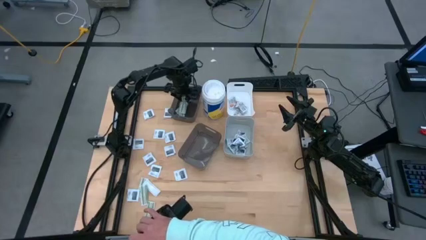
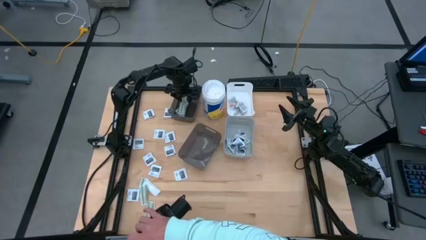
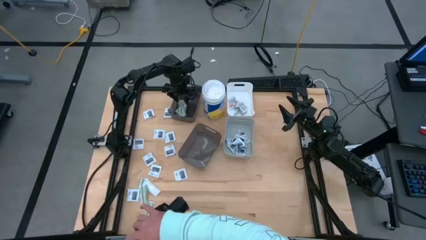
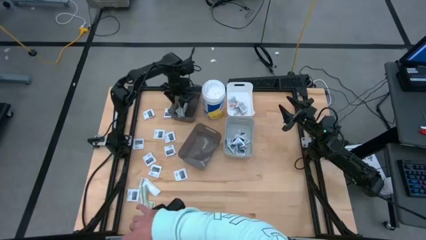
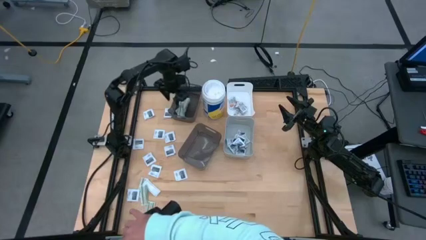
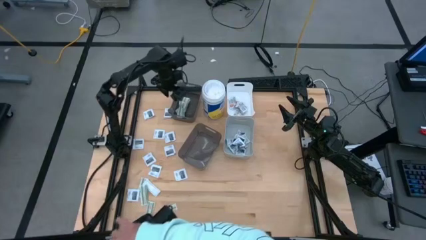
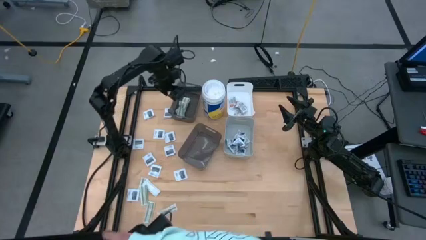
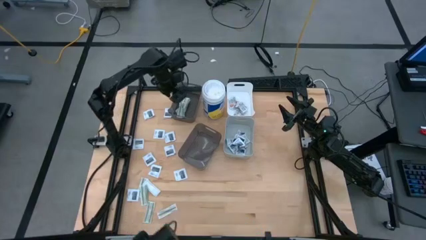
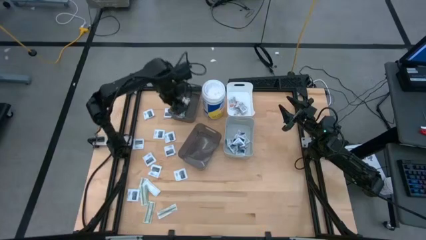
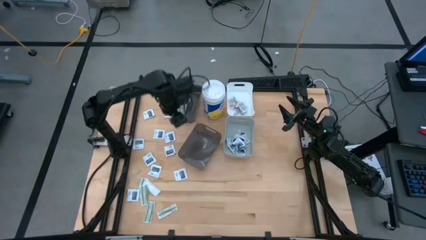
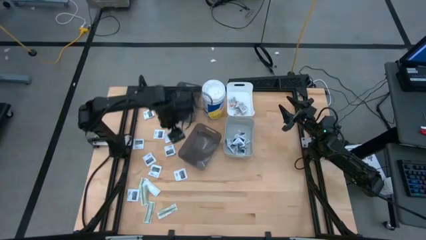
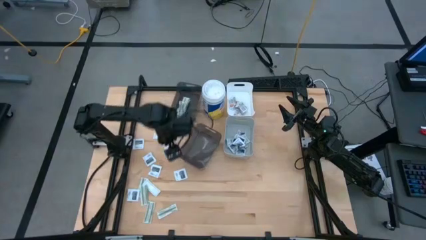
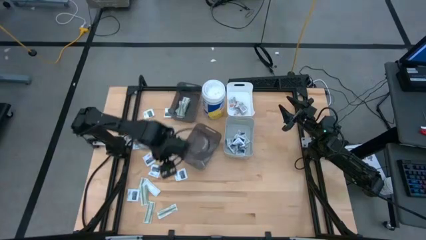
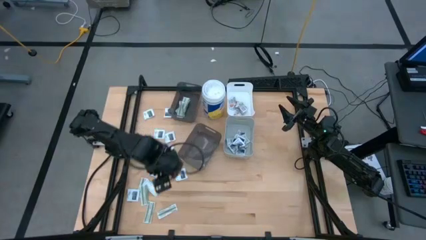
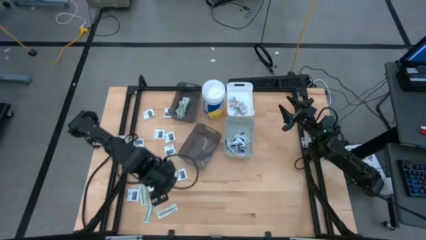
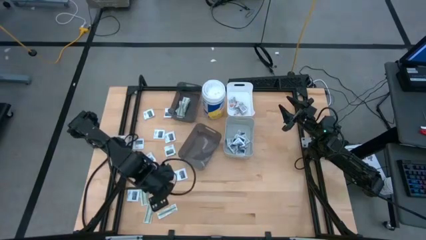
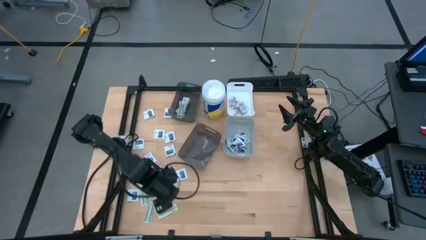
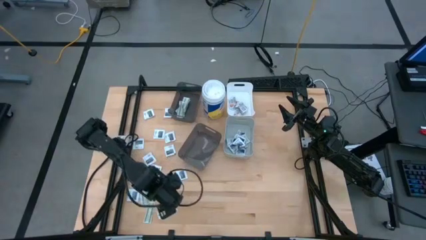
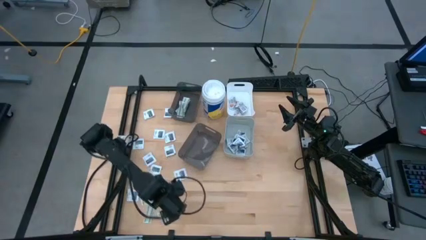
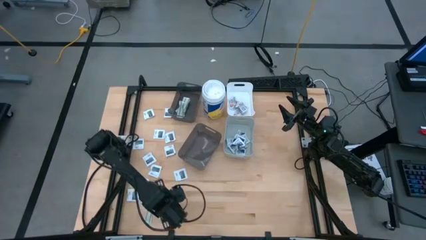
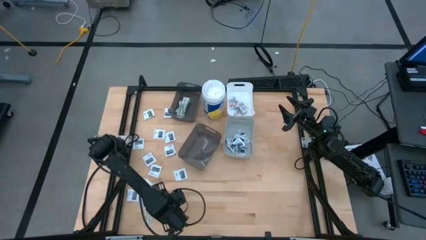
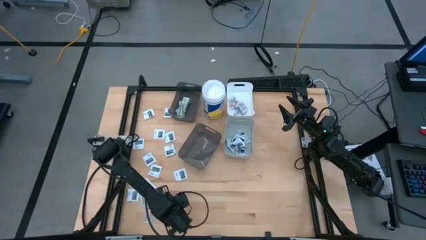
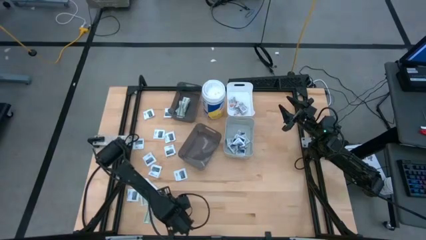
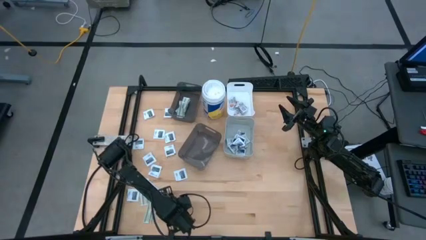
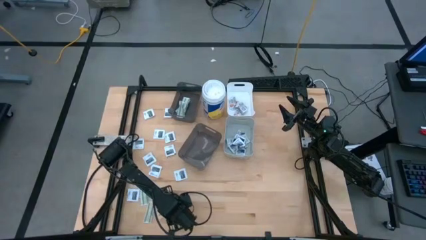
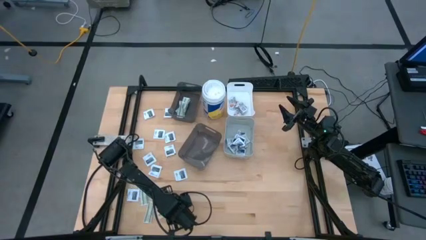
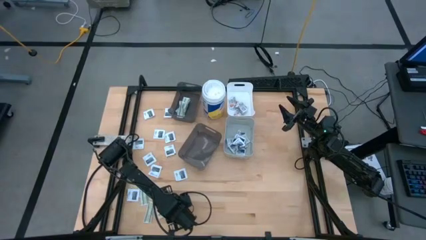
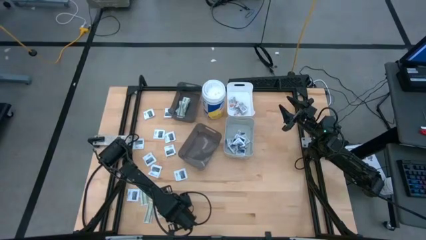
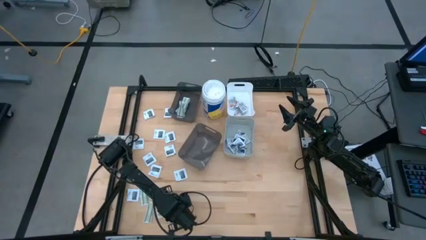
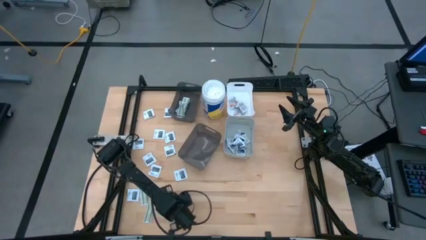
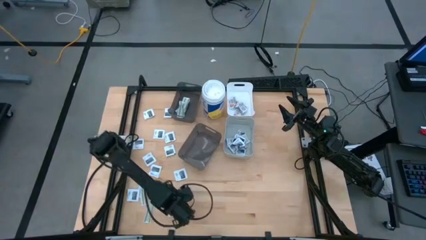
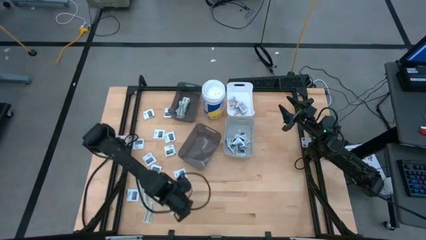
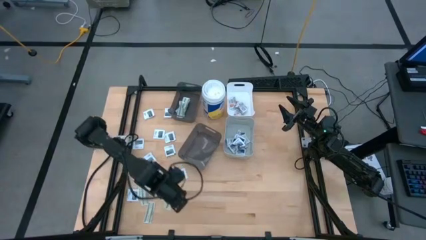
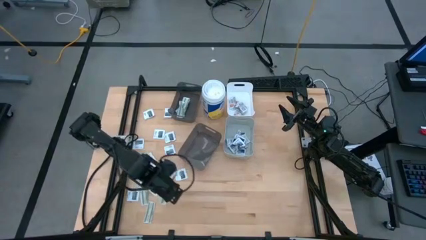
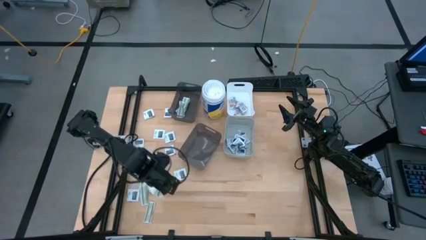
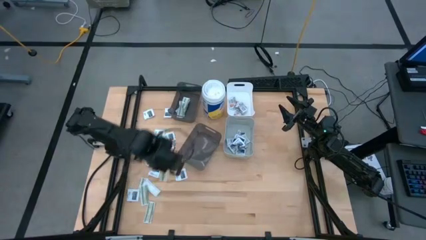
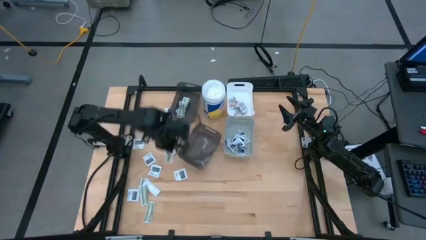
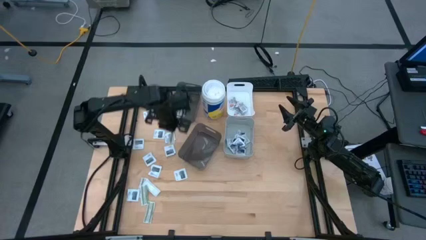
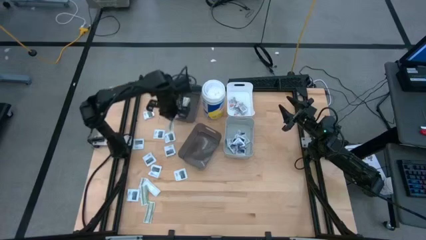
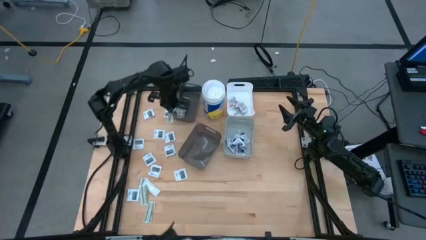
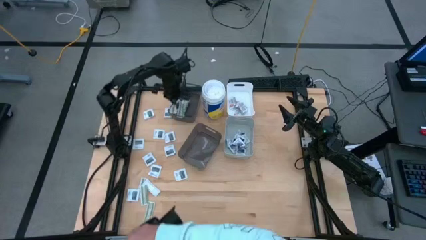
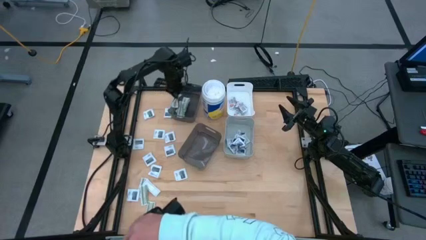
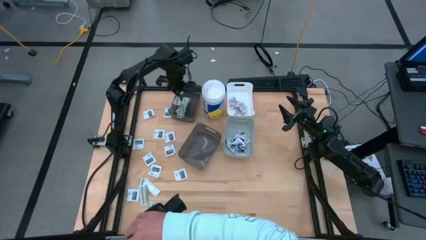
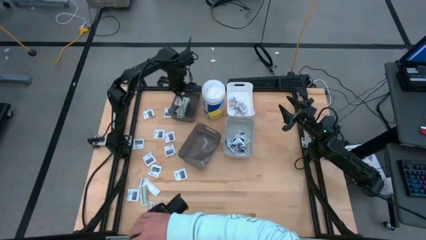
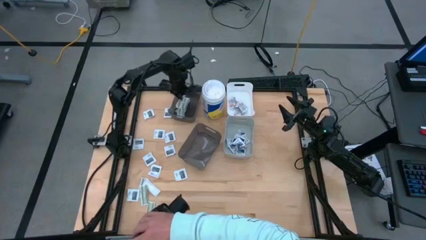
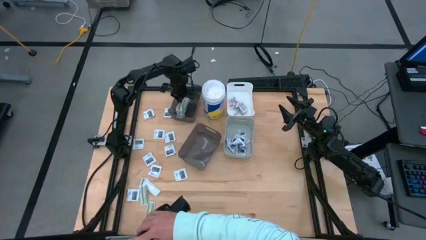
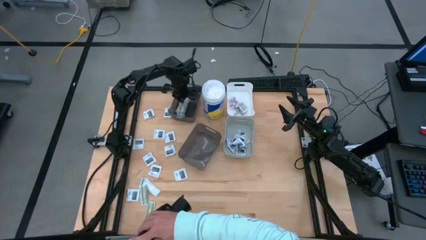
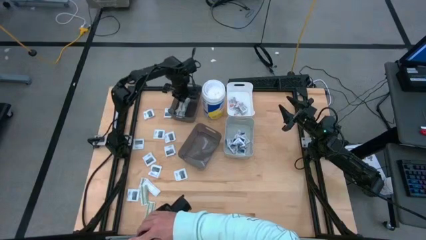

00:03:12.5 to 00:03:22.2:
Task: Pick & Place First Aid Supplies
Put the bandage pack into the top black bin

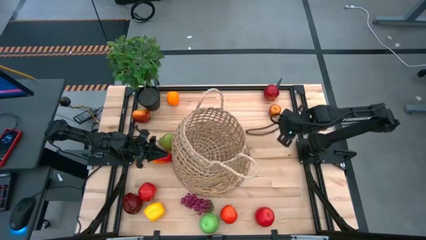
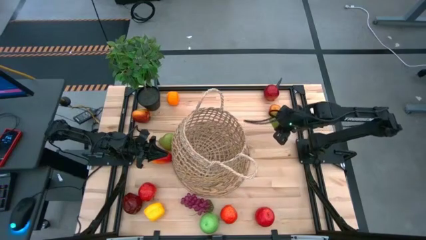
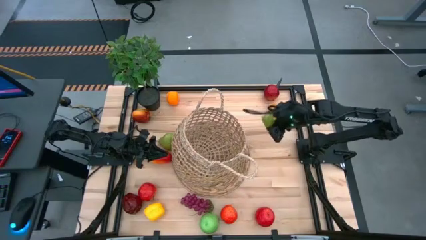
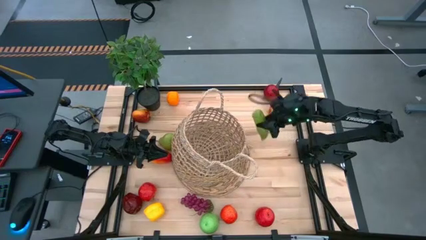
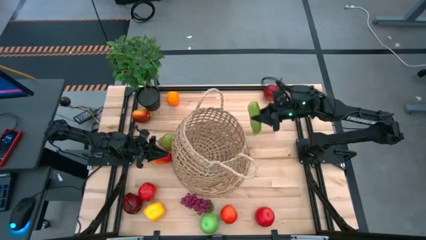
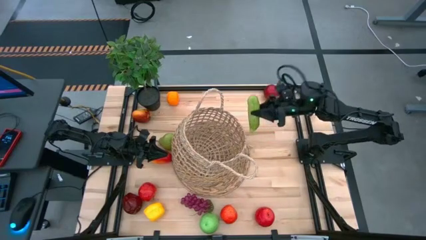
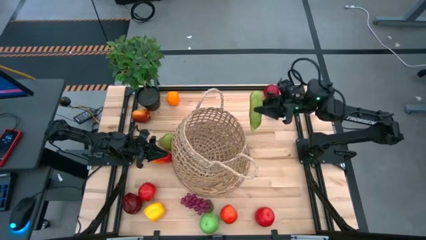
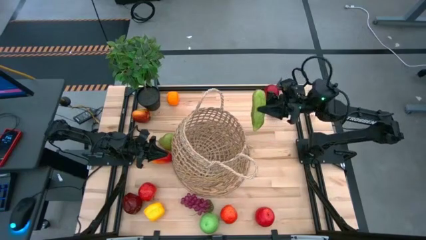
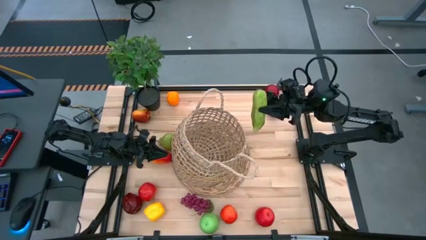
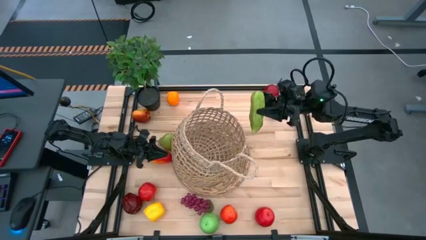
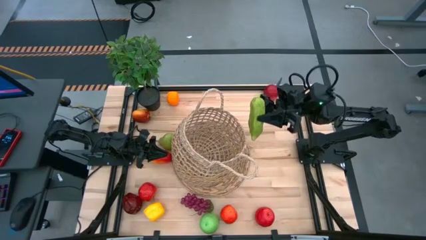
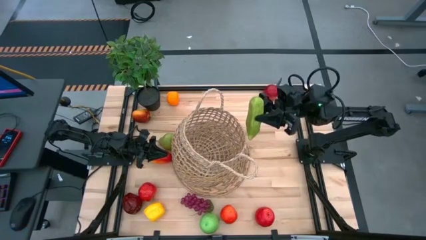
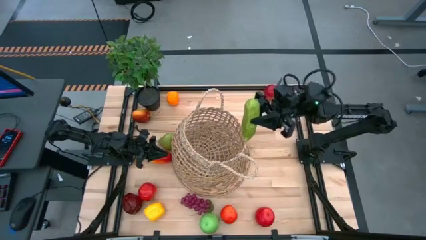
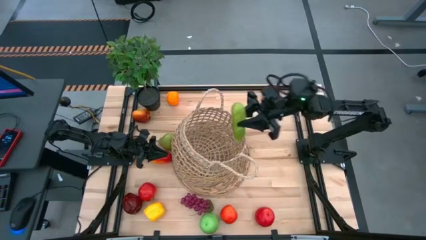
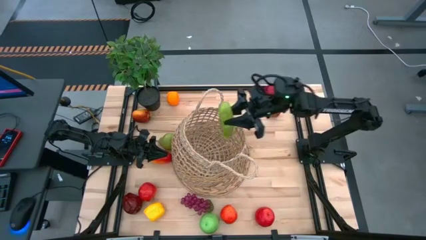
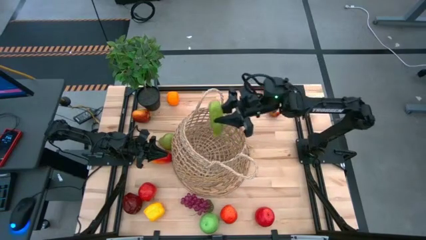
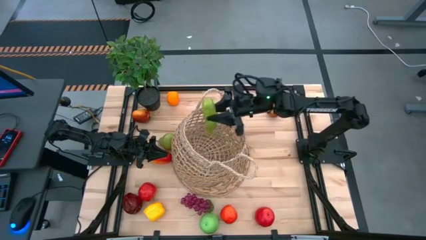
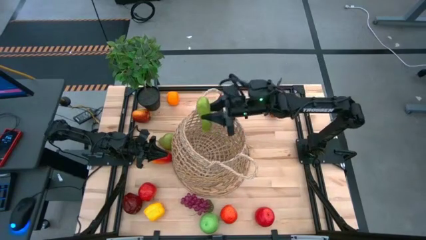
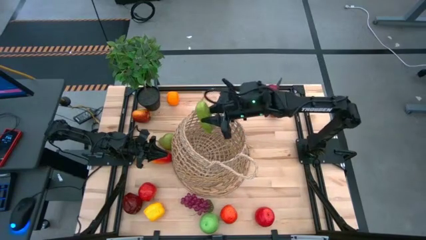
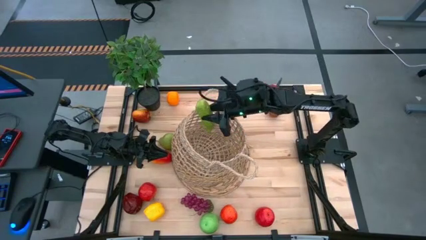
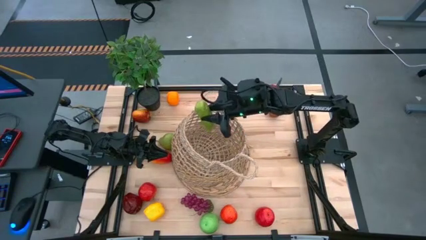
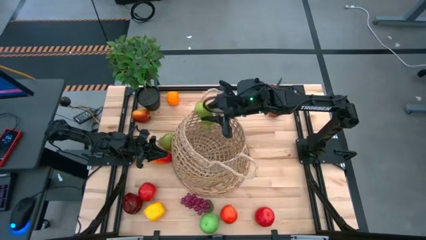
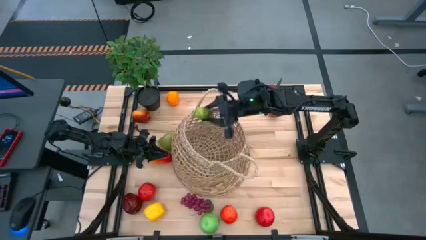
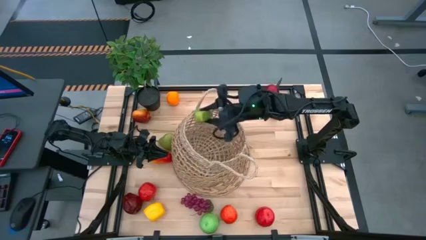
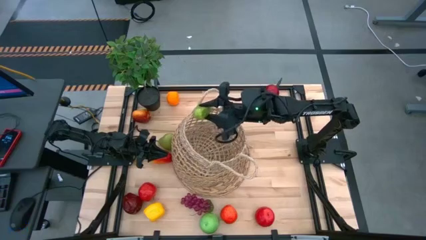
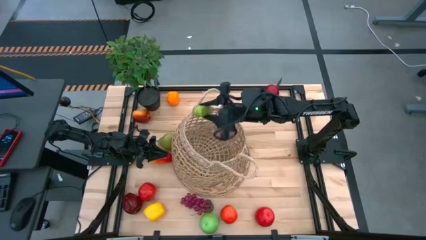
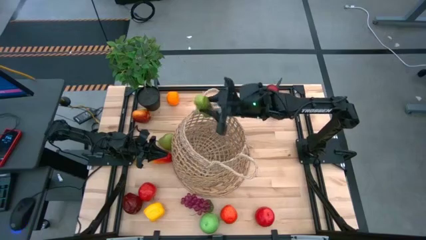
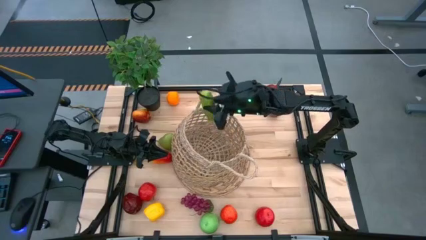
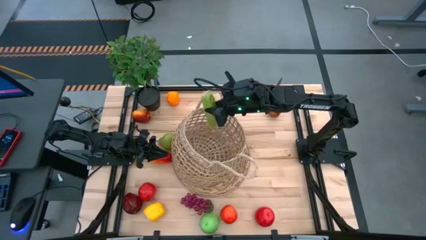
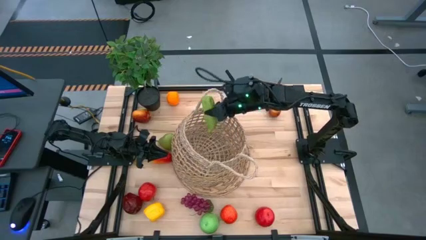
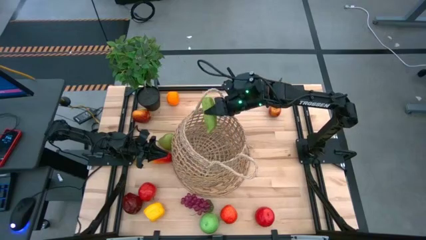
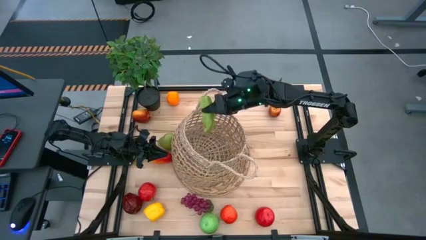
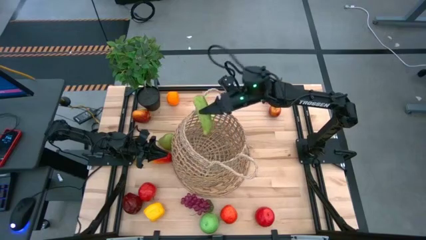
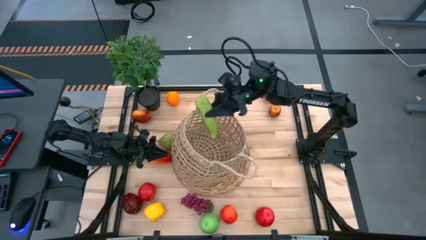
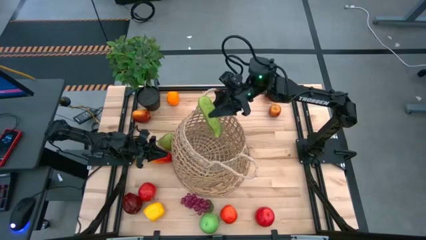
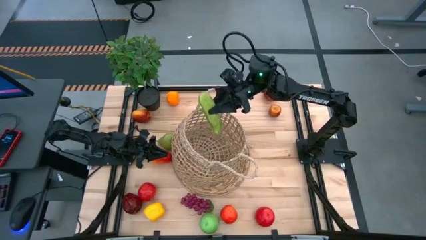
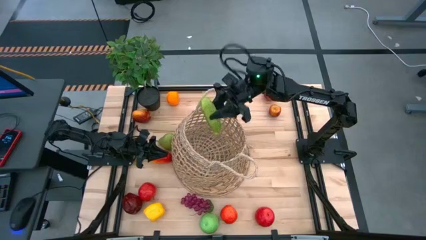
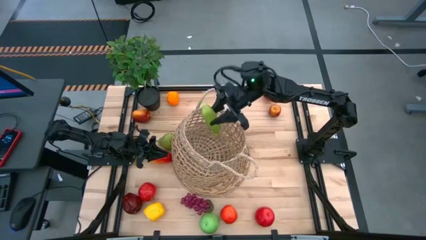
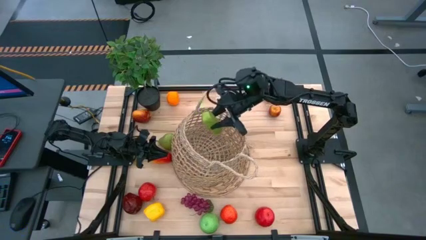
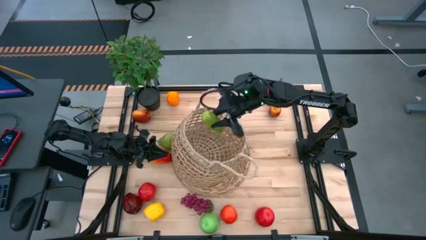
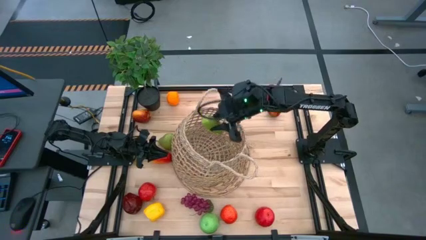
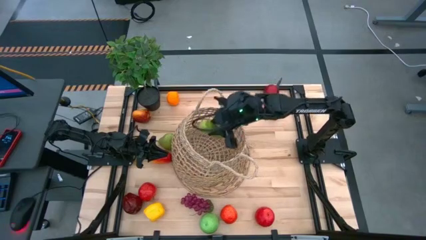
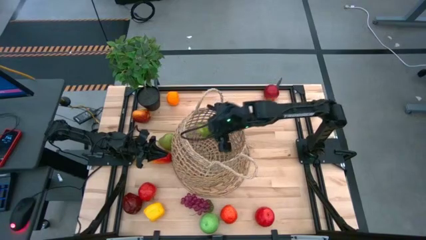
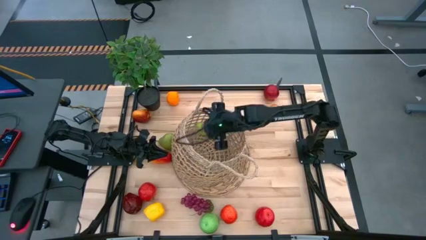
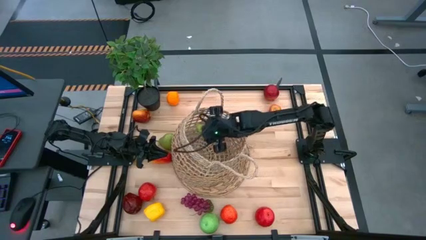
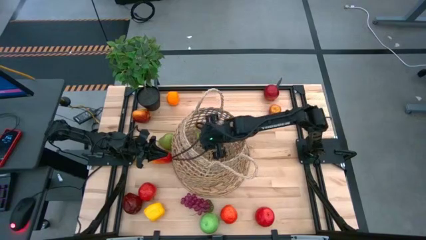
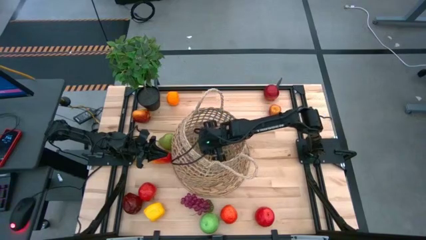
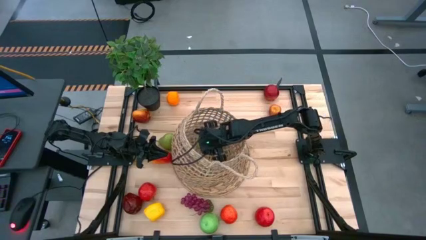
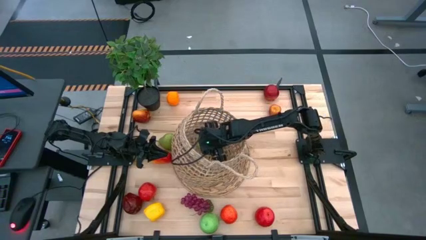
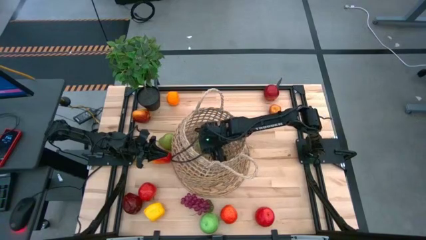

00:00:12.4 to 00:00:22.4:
Task: Build produce basket
Put the cucumber into the basket
